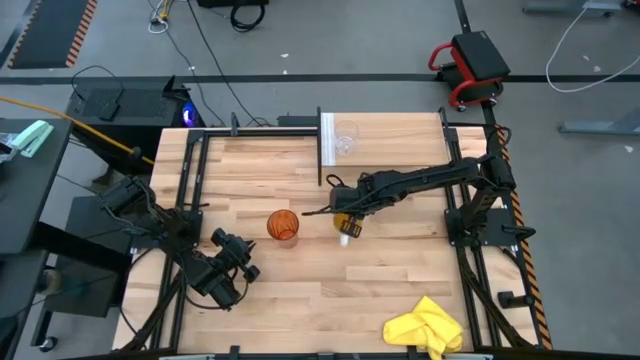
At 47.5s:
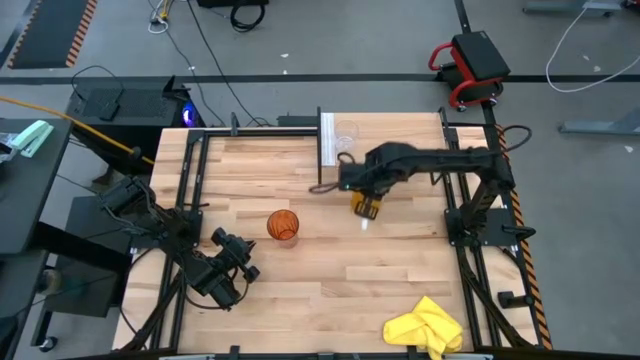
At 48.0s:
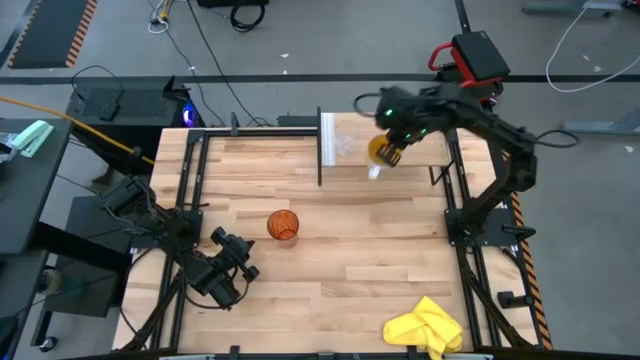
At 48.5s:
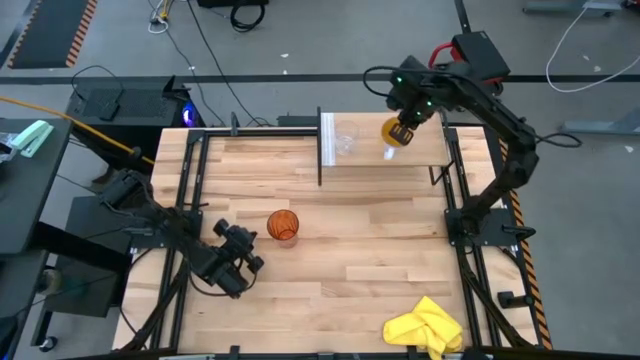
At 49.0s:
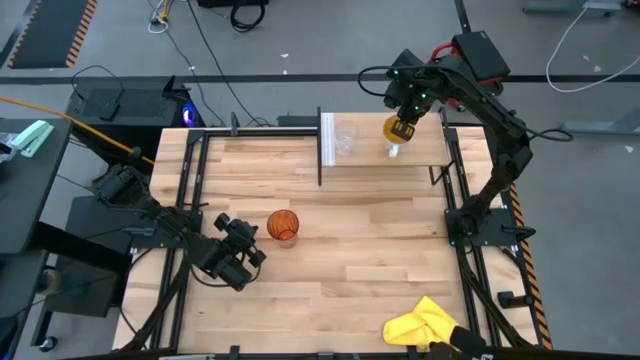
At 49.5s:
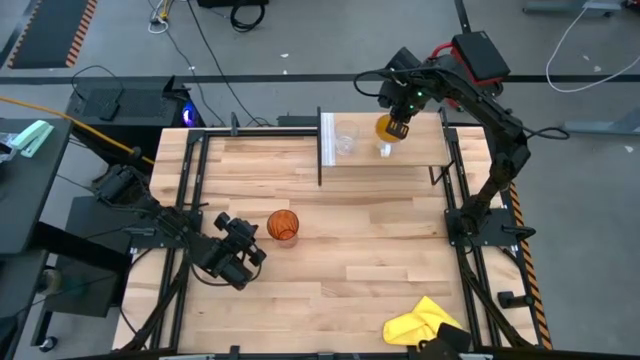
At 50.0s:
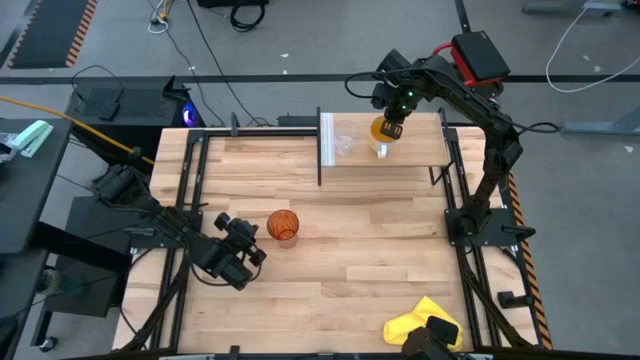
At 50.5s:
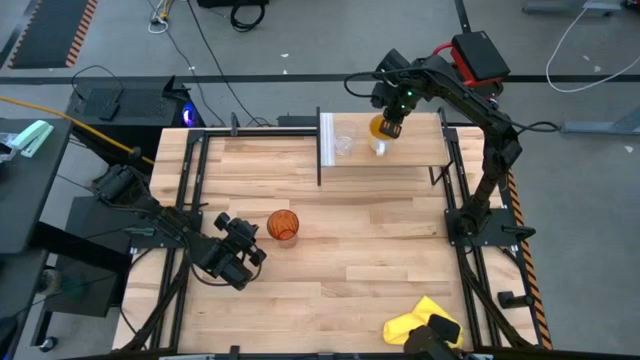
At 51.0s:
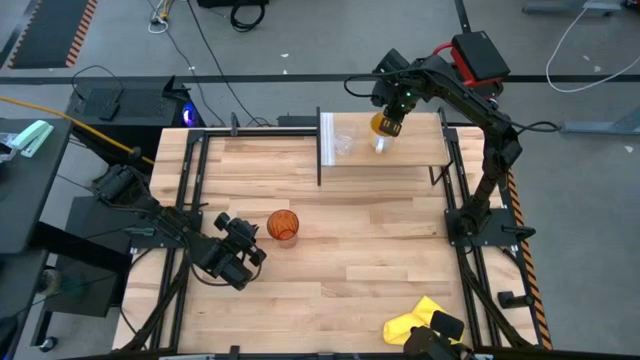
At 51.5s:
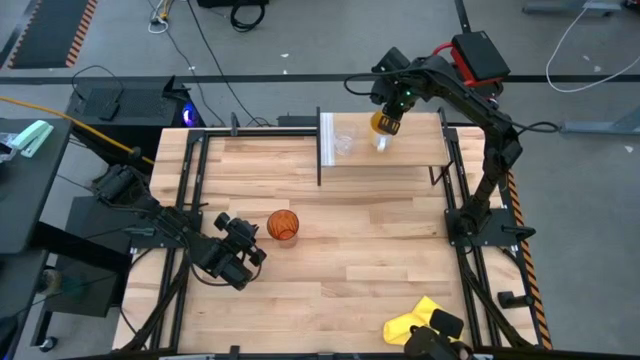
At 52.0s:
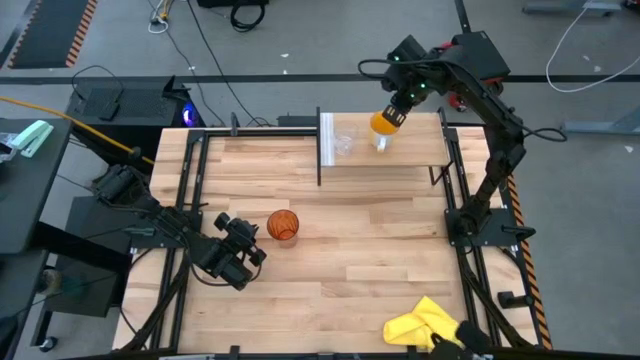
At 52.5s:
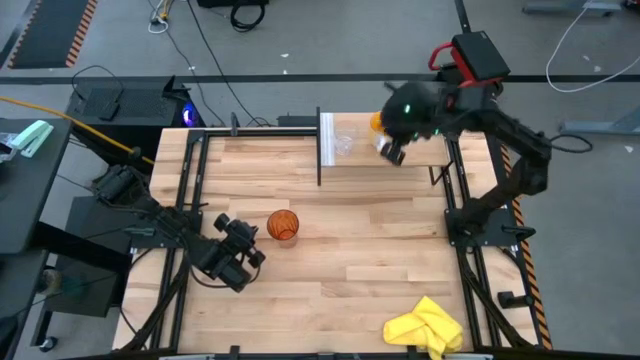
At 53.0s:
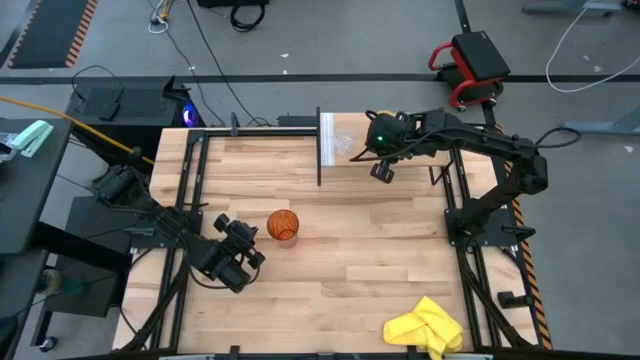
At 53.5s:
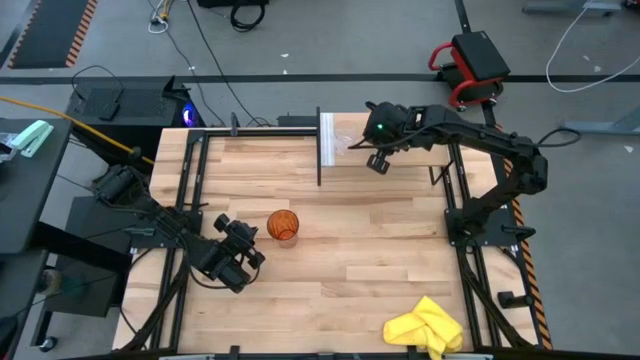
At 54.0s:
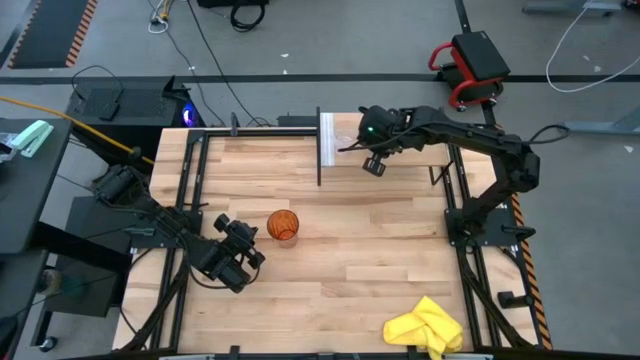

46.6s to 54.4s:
Task: Stack small to large cups/mugs on shelf
Put the yellow cup on the shelf

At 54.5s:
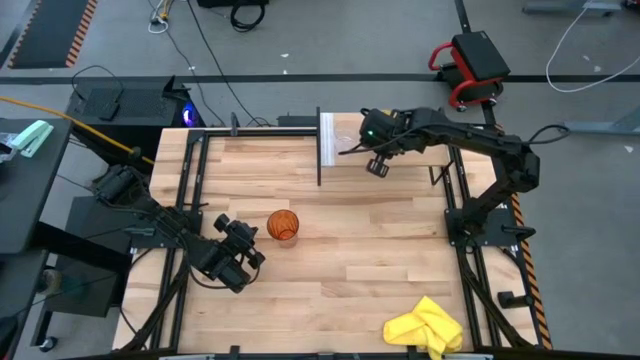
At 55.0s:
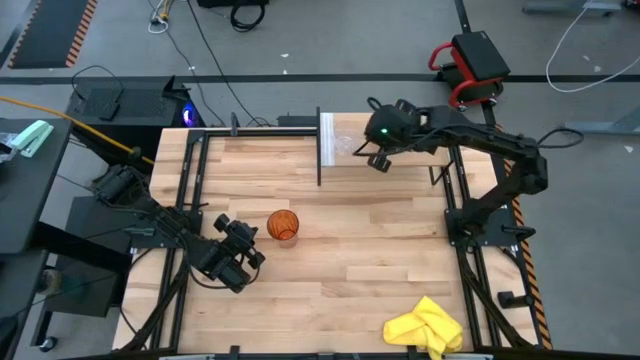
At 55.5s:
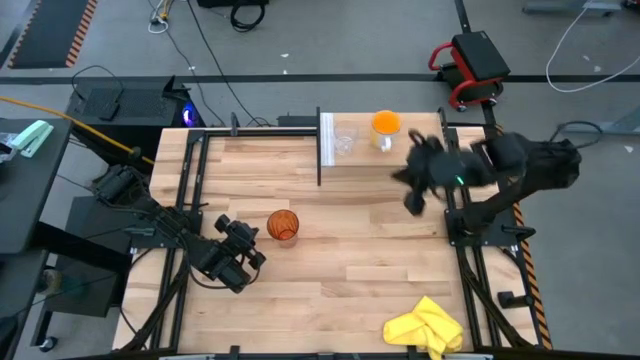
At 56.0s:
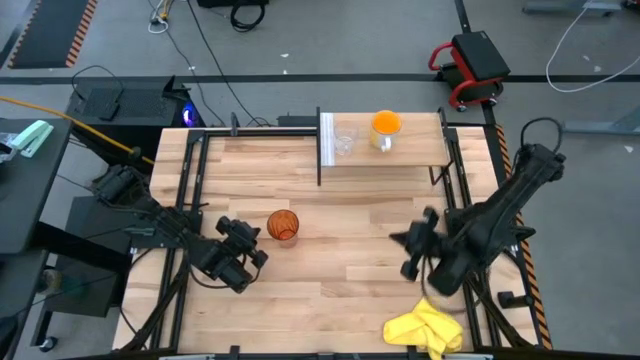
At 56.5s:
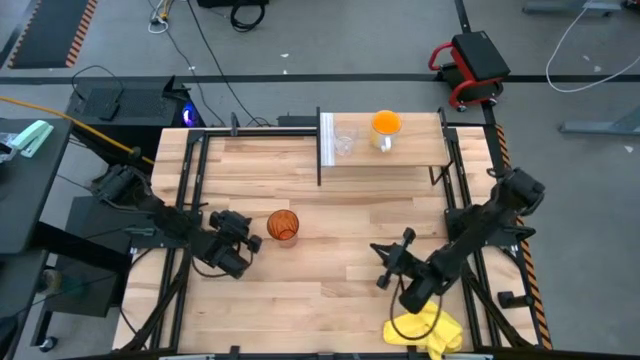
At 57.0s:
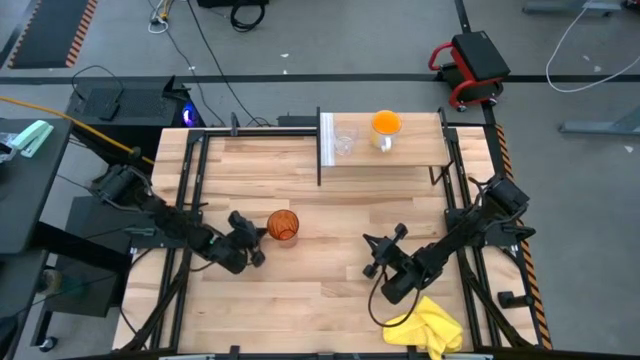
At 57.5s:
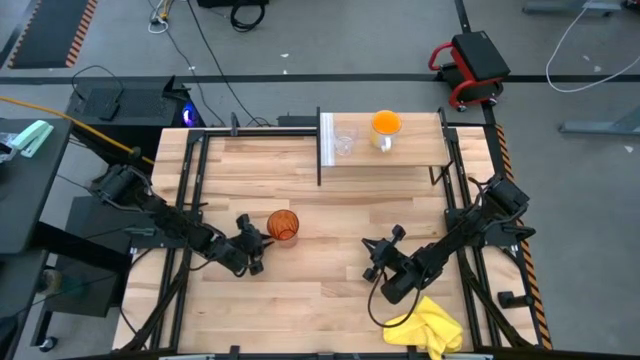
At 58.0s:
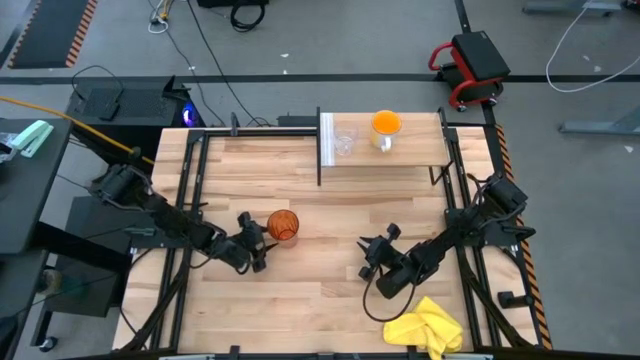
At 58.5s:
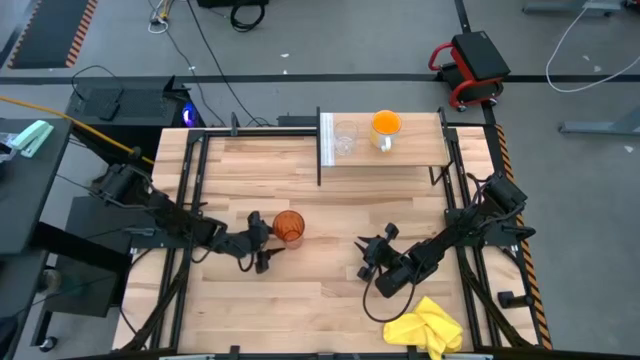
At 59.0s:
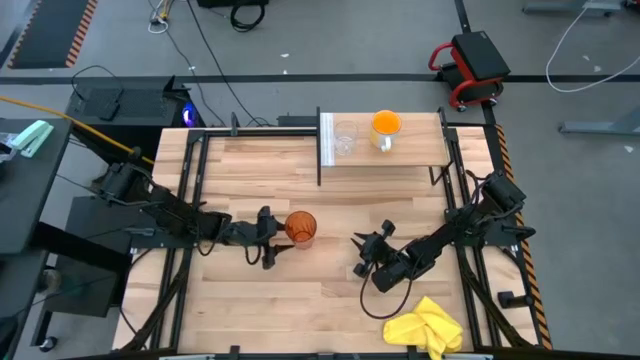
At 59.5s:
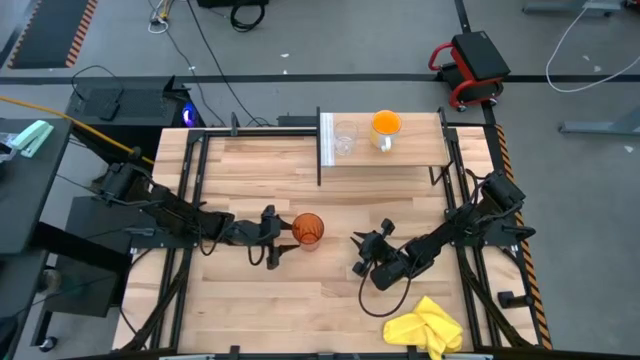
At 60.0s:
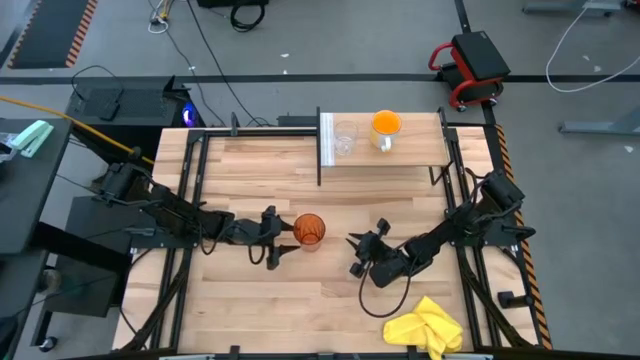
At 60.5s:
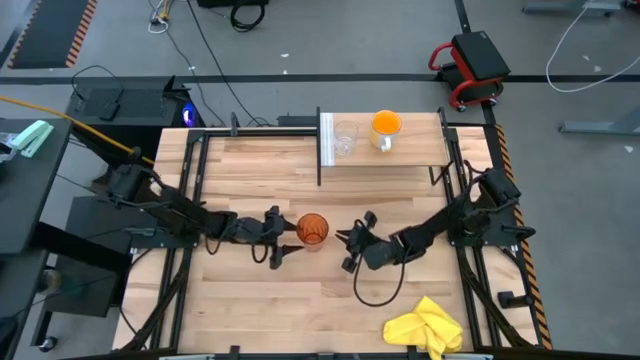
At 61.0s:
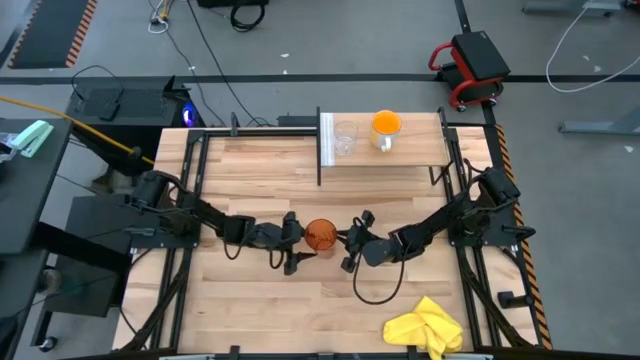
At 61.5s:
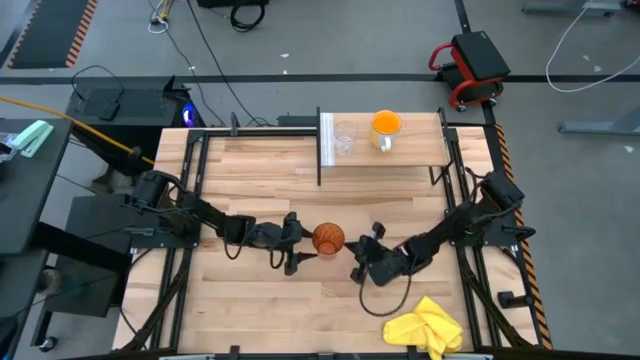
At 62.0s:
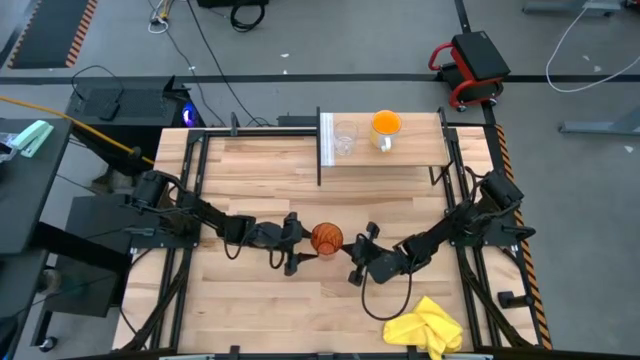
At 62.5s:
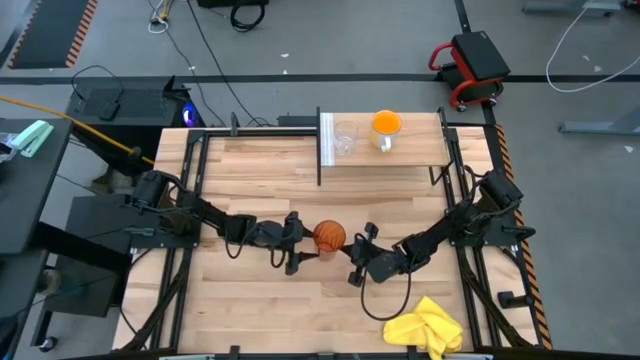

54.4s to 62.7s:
Put the brown cup on the shelf

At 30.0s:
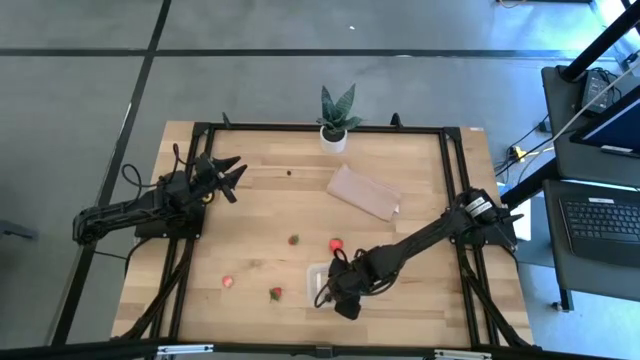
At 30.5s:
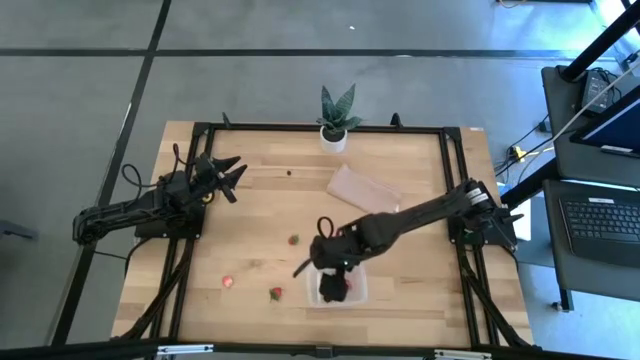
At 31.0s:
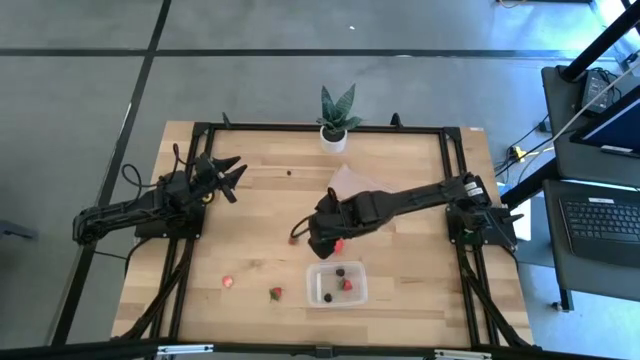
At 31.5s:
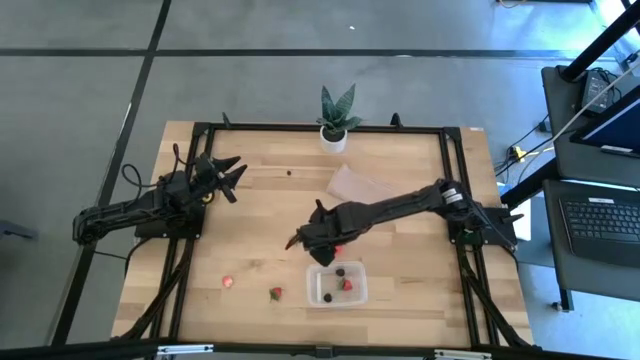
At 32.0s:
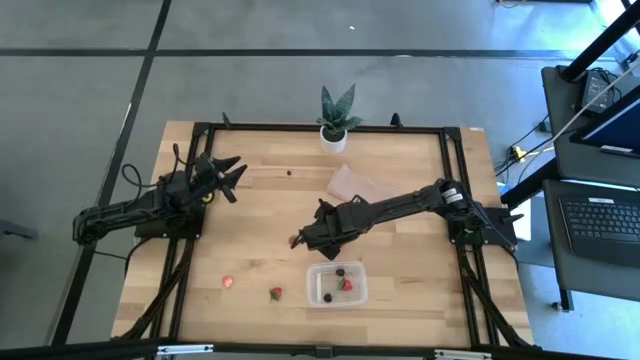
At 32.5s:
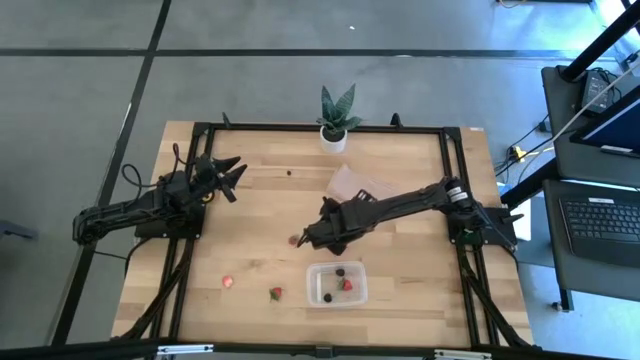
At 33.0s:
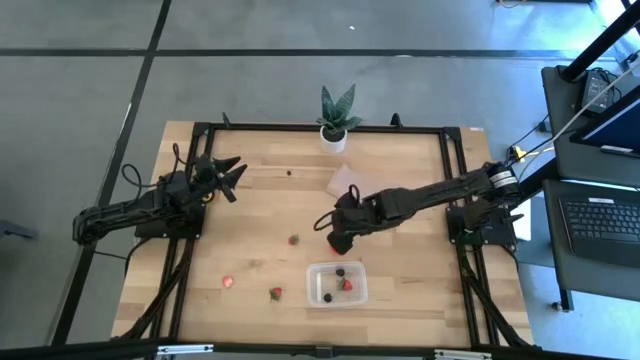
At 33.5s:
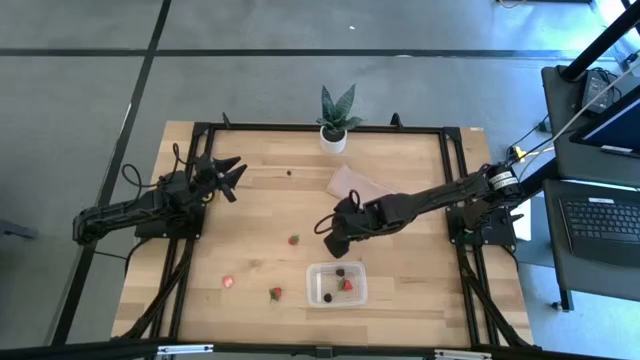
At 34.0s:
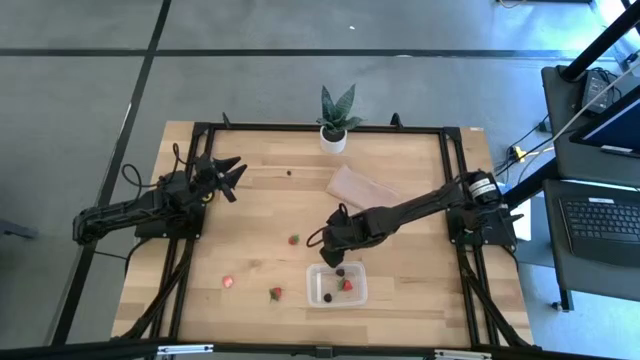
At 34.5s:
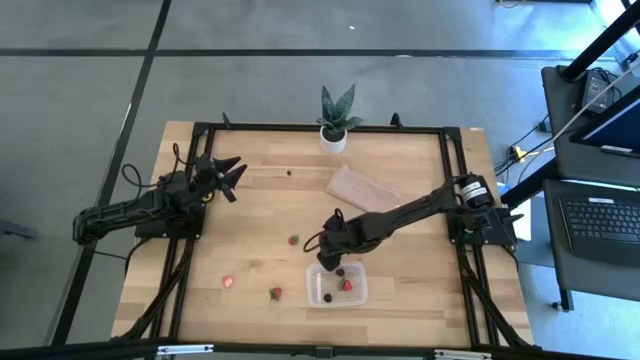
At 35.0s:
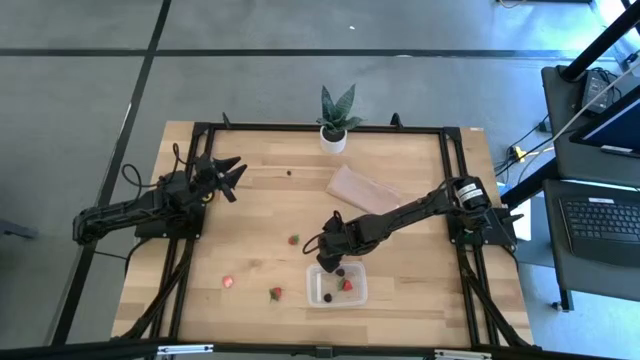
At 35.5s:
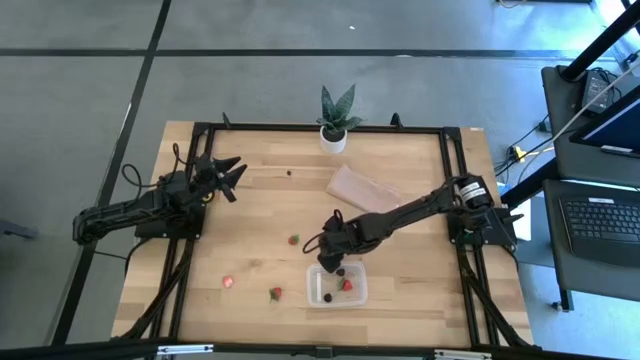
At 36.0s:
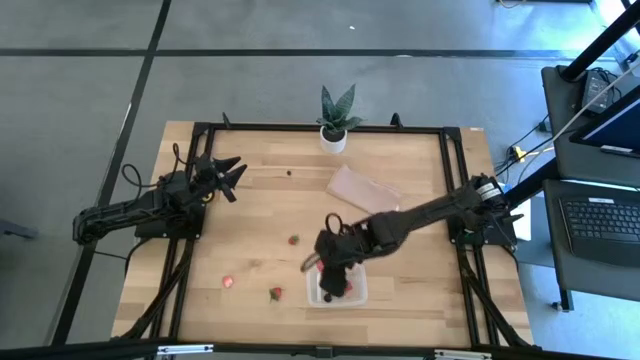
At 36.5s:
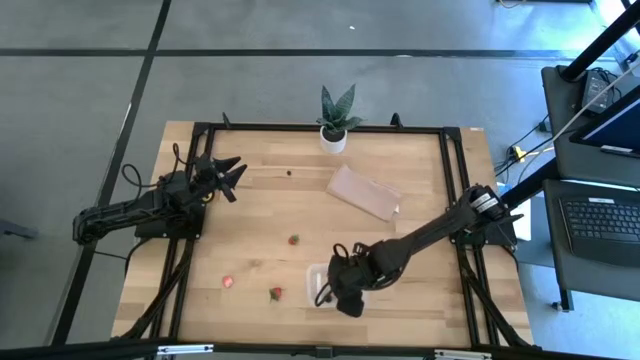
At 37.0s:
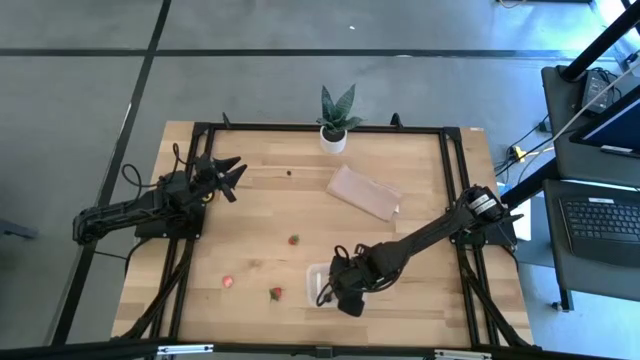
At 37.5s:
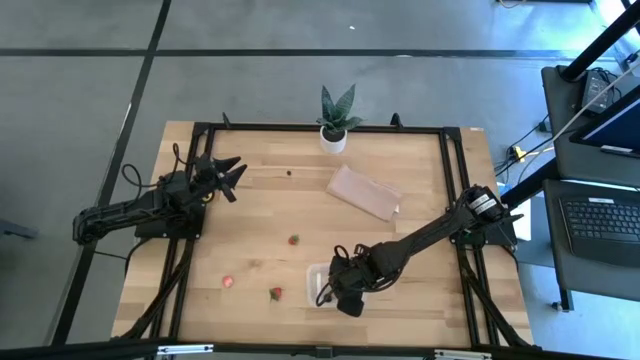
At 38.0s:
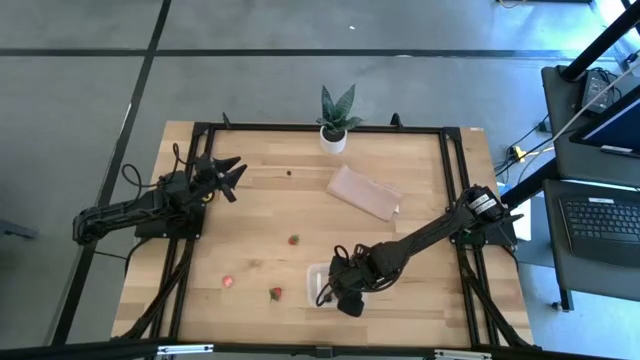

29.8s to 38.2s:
Task: Pick and placing Produce into tupperware
Put the red strawberry in the bin
